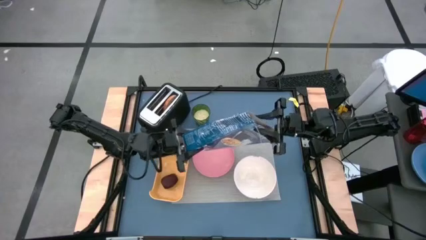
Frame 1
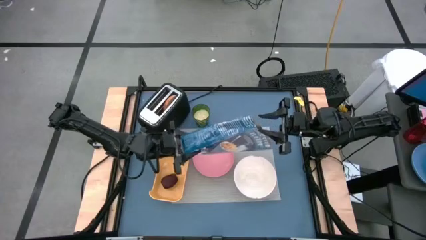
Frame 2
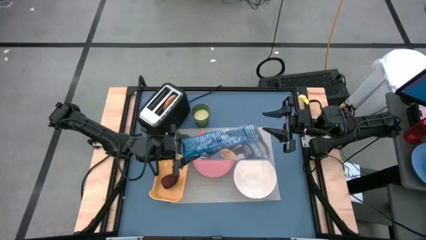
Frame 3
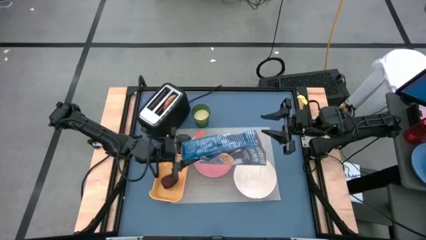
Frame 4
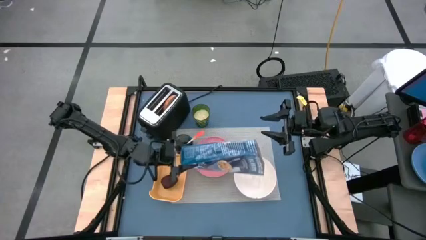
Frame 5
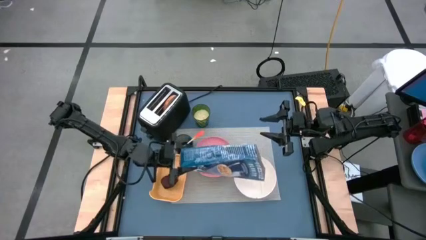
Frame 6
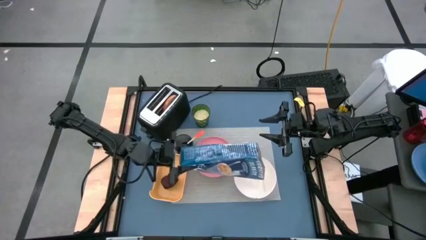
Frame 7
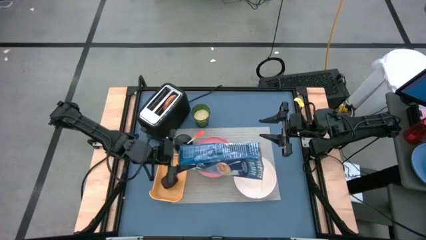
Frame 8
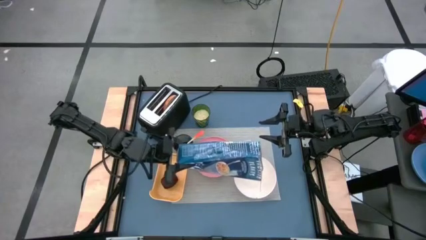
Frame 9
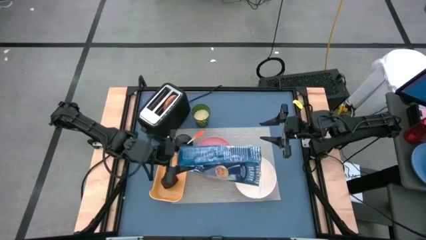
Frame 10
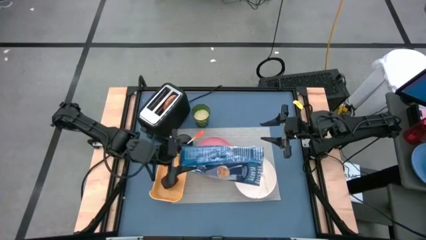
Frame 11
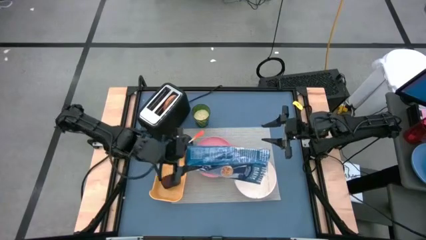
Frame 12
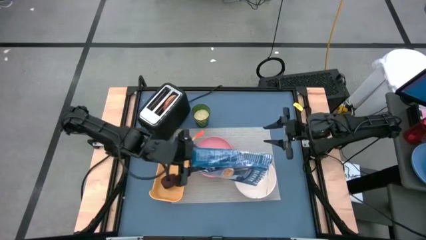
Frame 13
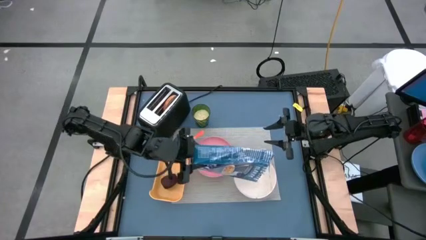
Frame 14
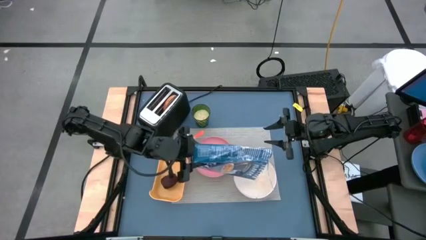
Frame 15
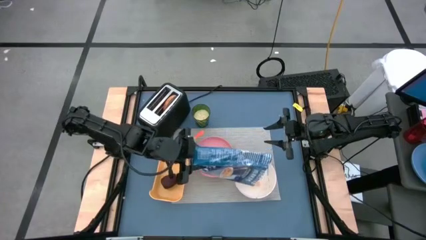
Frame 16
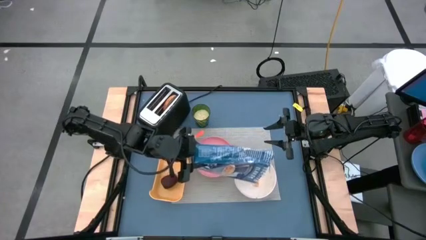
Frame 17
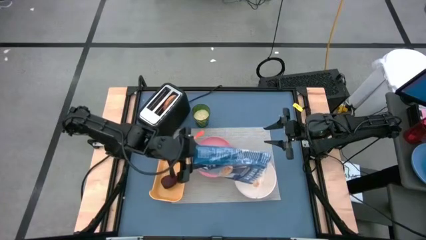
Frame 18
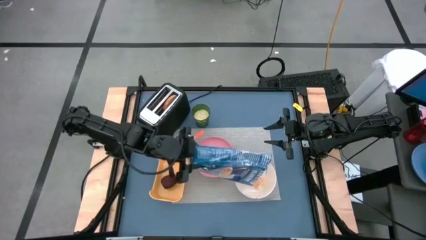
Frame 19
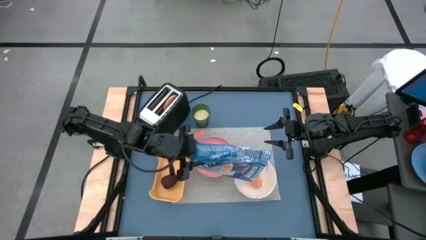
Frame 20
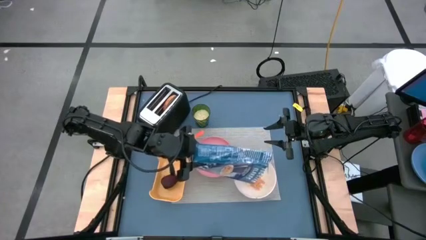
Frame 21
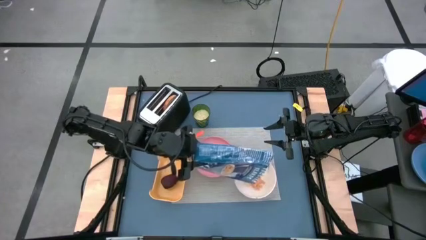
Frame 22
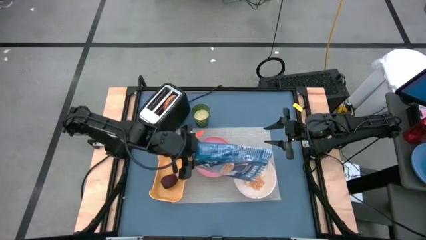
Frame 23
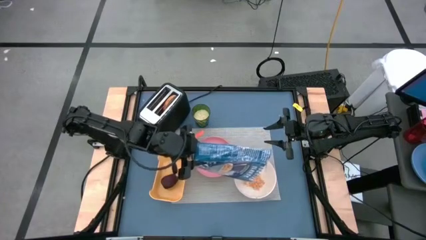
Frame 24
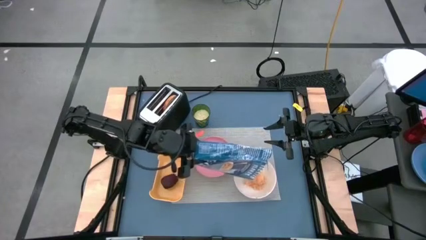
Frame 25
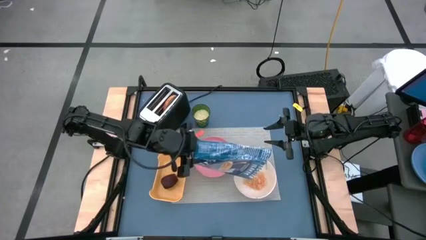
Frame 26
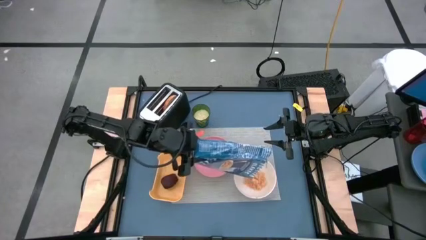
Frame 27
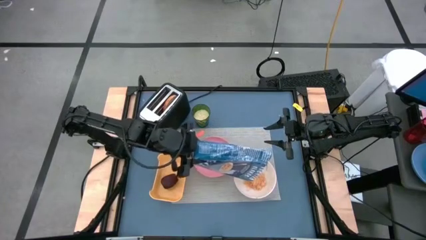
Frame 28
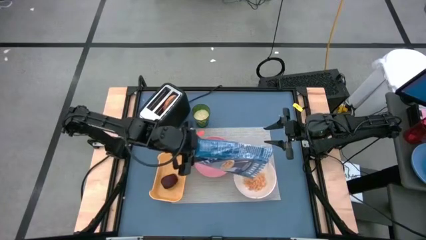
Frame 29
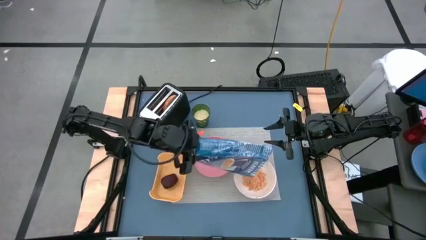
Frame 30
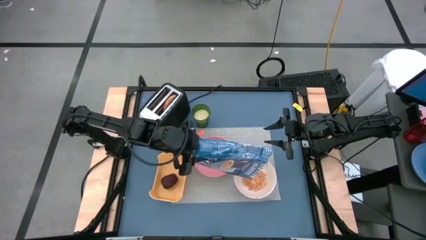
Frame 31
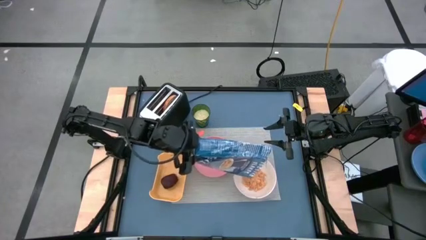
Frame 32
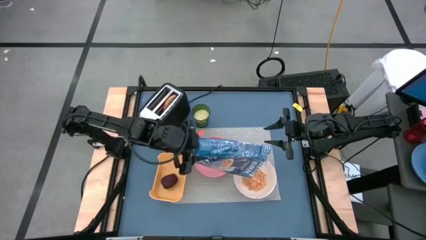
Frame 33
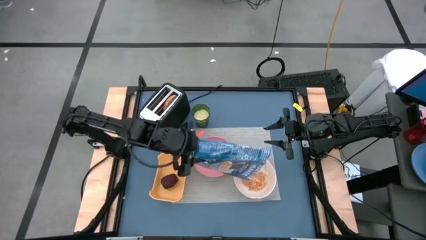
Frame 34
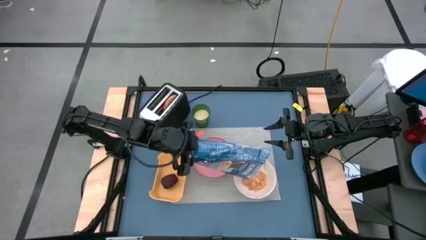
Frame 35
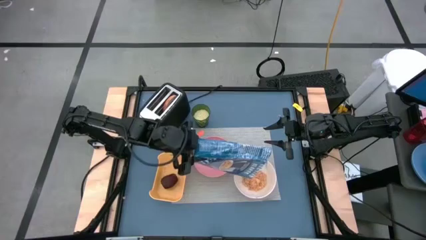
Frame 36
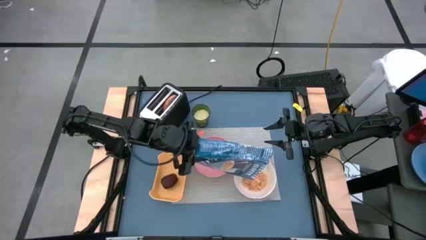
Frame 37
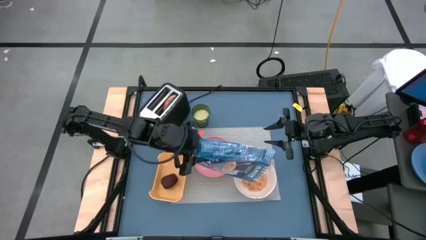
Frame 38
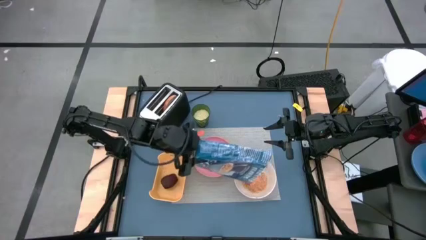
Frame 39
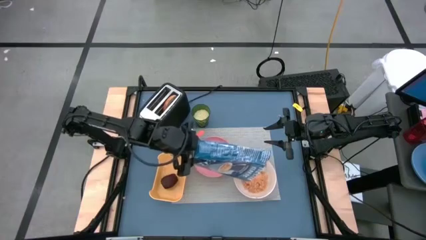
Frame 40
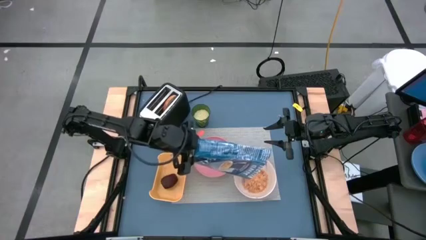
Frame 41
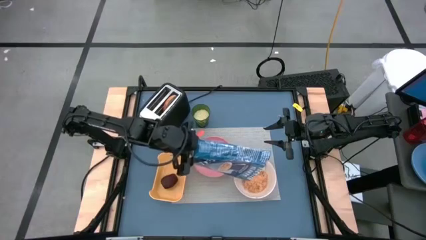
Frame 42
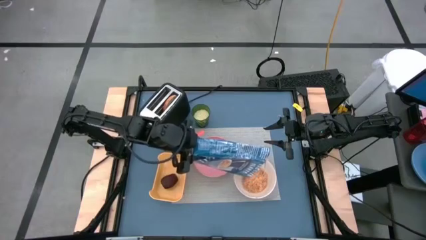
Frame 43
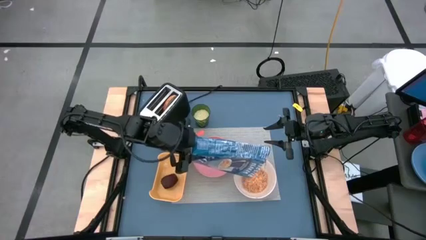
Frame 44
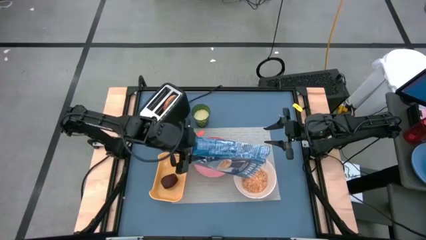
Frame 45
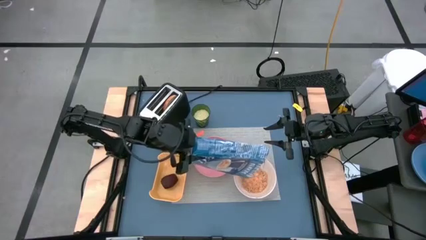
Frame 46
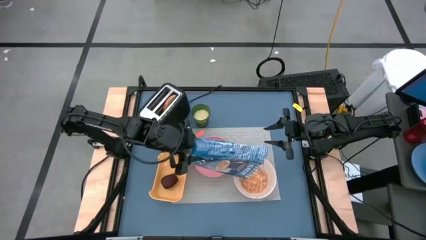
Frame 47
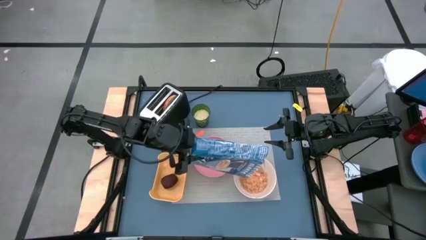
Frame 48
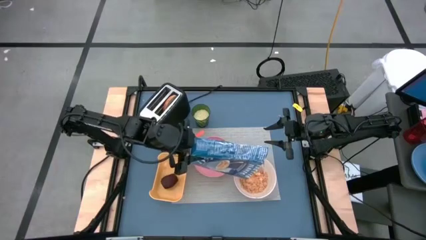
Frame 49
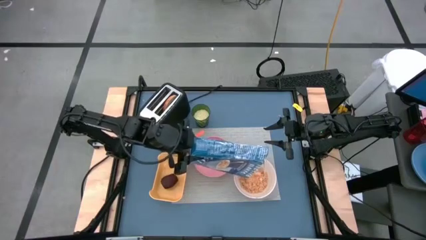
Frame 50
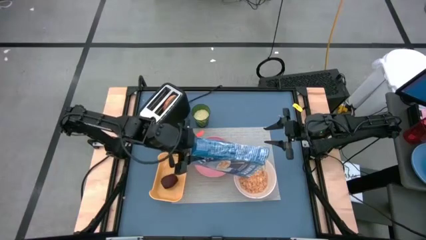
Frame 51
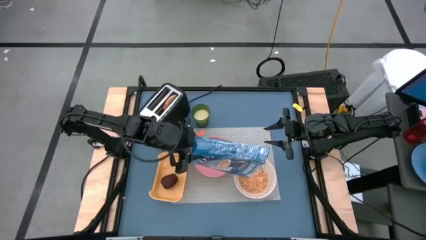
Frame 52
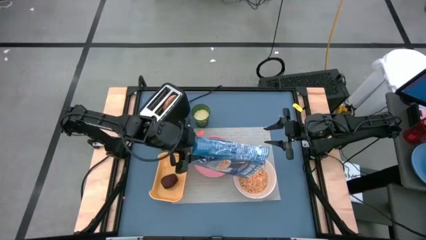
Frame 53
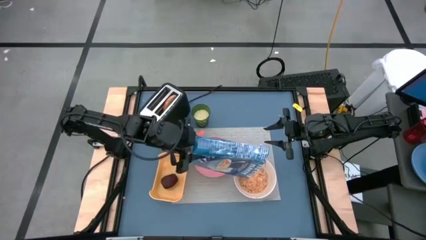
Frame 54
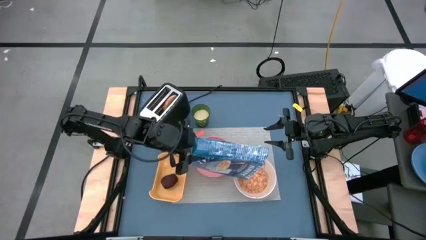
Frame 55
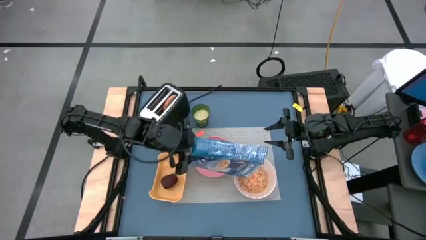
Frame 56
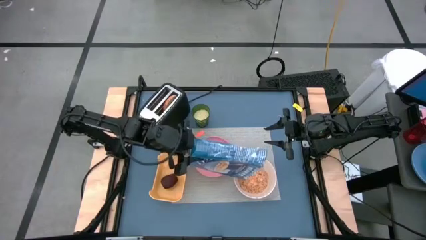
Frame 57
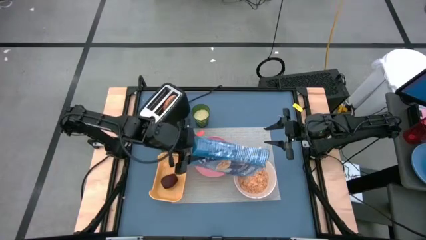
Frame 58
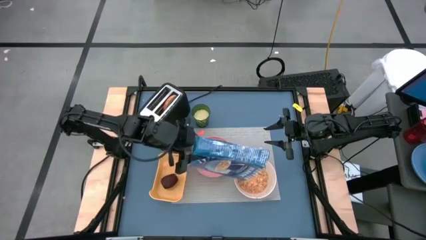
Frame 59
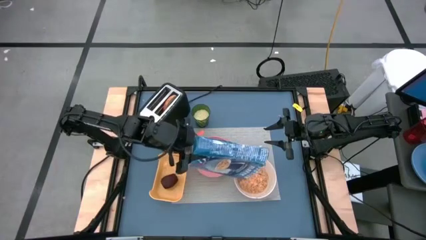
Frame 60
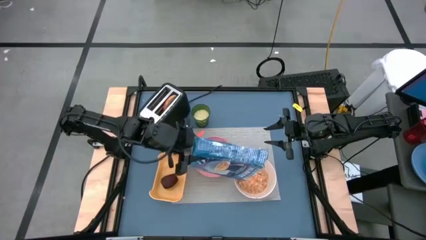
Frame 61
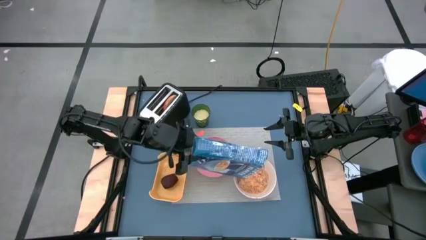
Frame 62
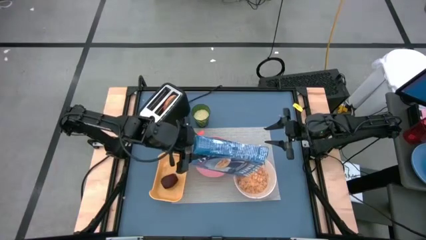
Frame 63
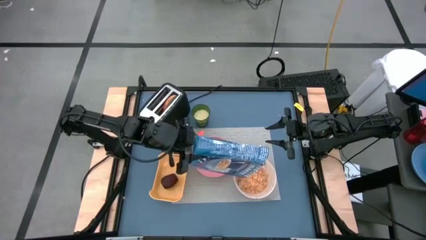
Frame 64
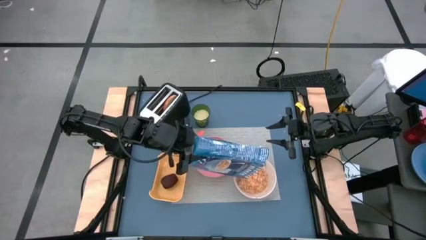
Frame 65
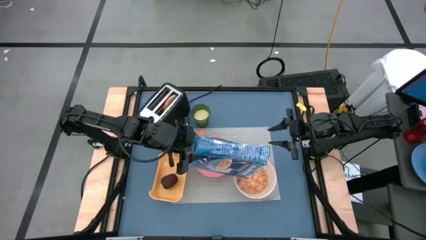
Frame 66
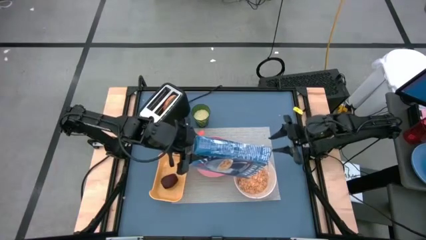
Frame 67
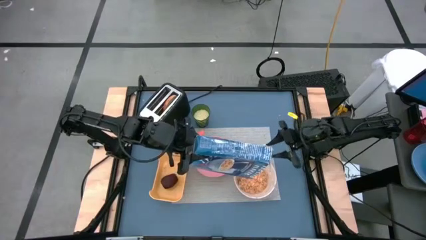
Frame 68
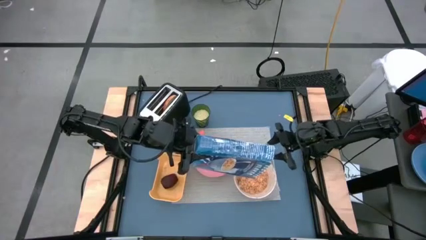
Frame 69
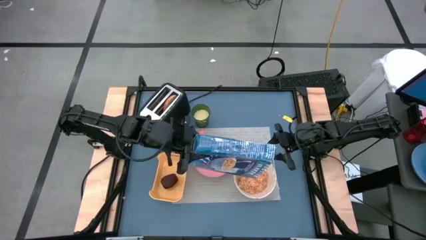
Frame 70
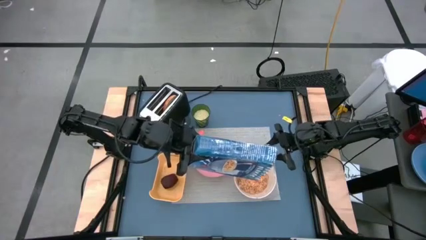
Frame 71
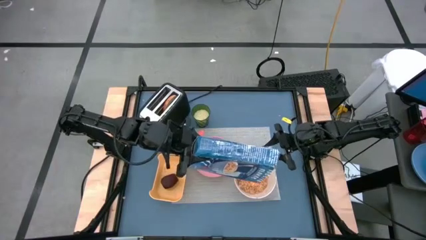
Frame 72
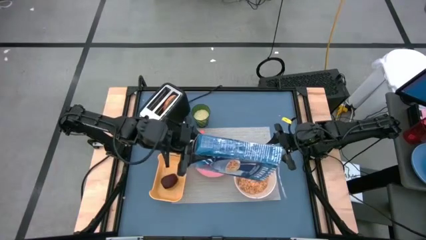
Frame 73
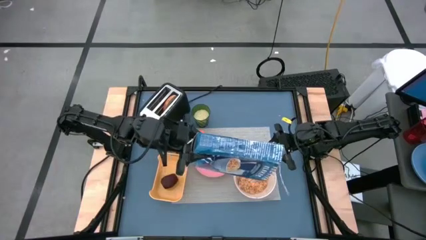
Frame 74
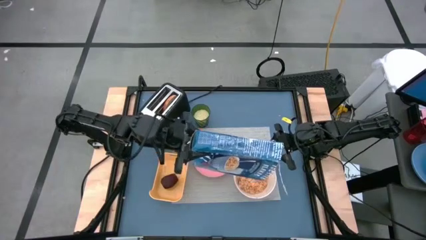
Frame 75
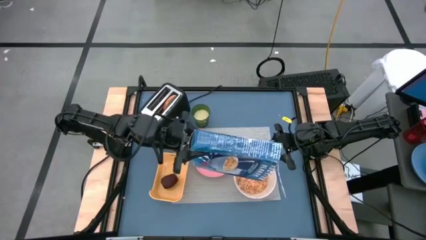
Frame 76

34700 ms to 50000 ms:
Task: Arrange a breakfast setting
Pour the cereal in the bowl

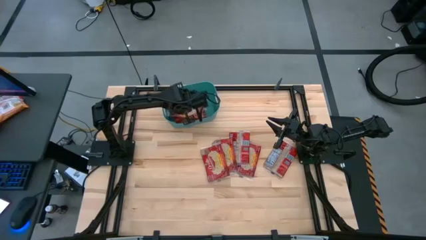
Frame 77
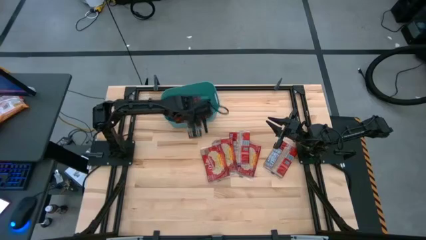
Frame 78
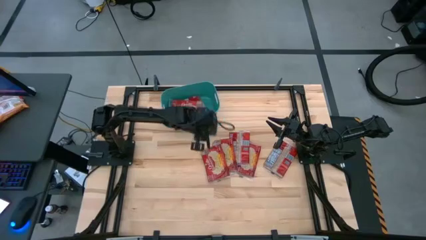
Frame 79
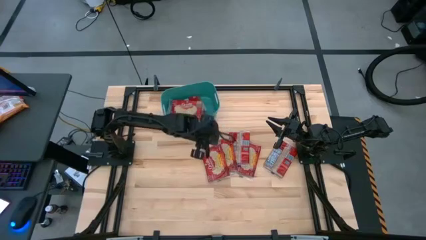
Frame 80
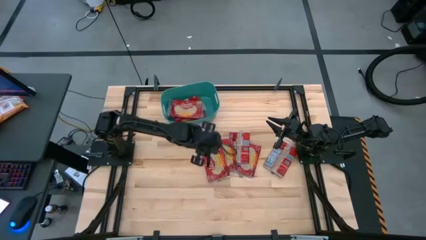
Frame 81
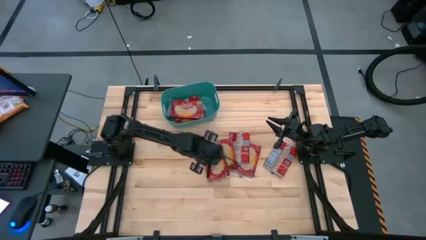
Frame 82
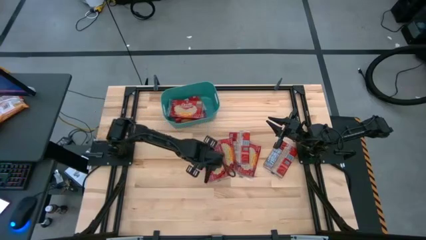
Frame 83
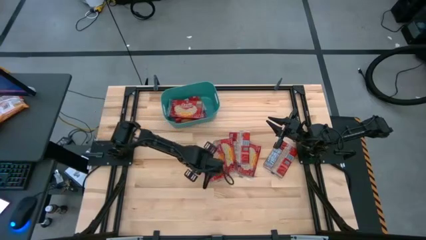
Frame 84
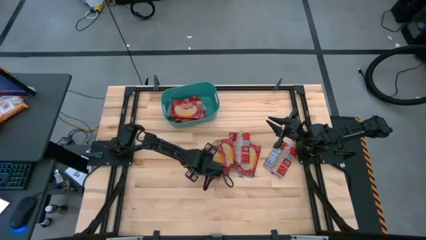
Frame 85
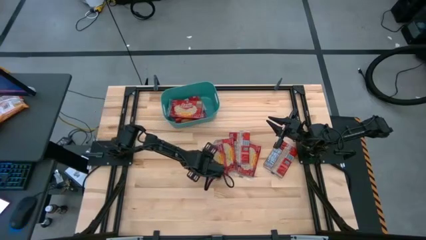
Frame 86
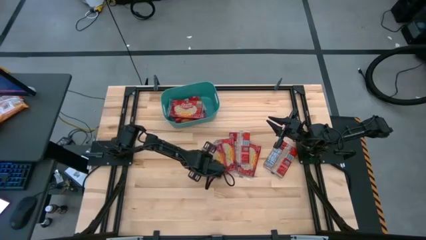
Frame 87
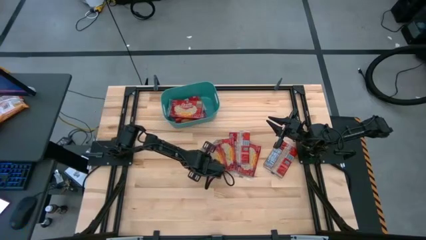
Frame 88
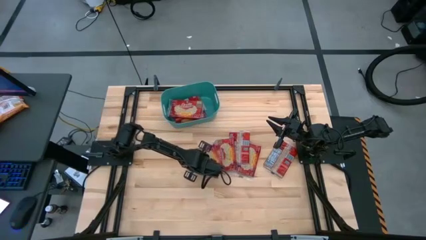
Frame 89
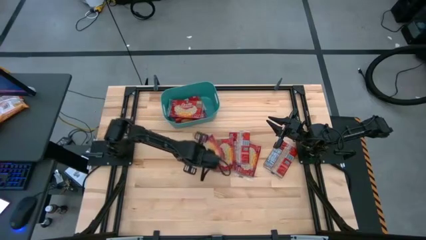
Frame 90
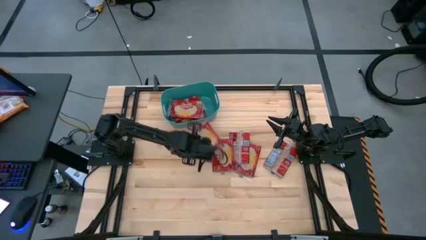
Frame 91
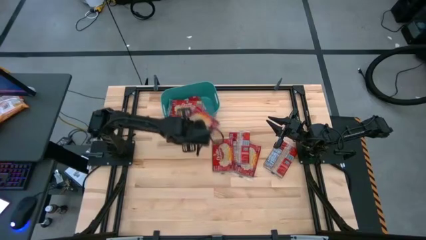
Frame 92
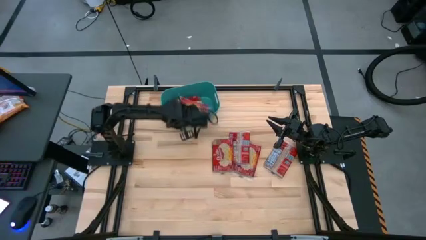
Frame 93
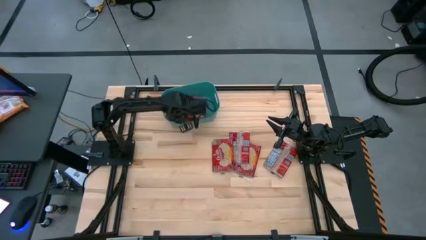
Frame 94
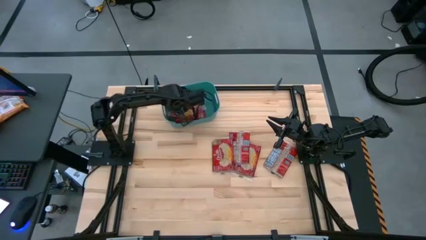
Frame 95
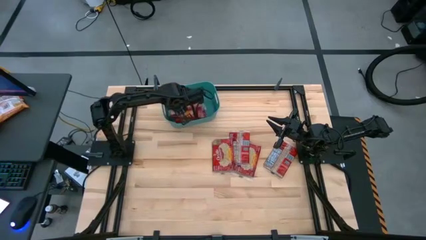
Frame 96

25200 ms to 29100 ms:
Task: Sort popcorn bags into baskets
Stack the popcorn bag into the green bin
